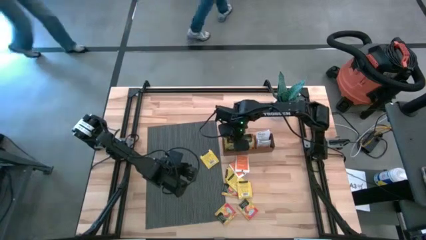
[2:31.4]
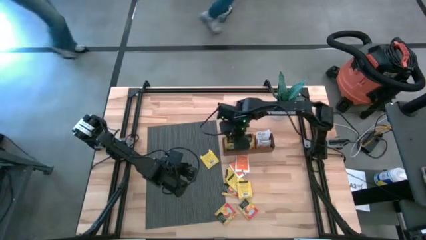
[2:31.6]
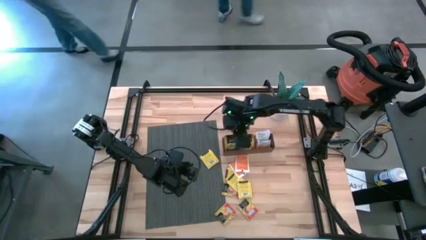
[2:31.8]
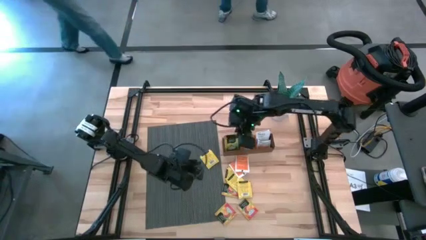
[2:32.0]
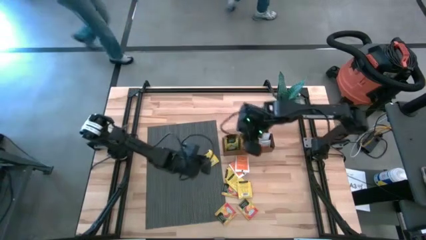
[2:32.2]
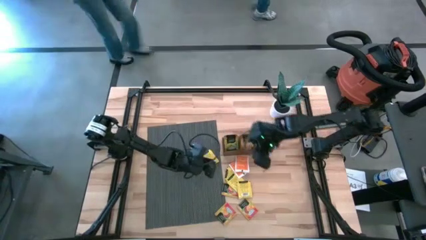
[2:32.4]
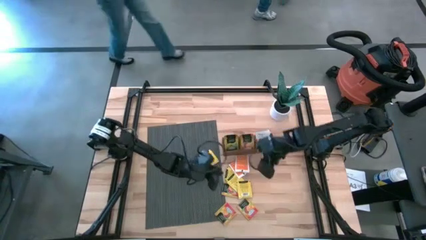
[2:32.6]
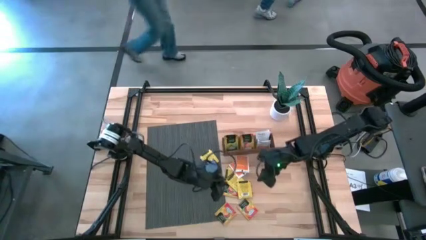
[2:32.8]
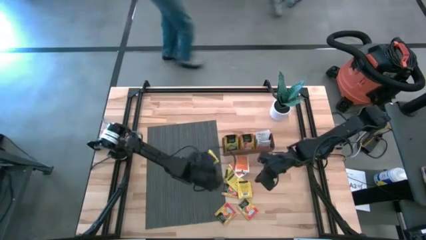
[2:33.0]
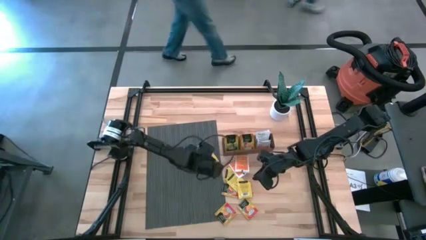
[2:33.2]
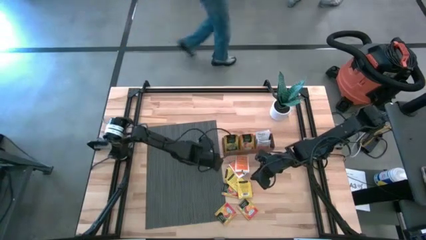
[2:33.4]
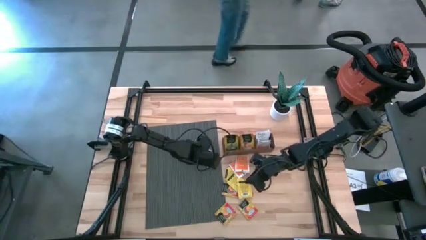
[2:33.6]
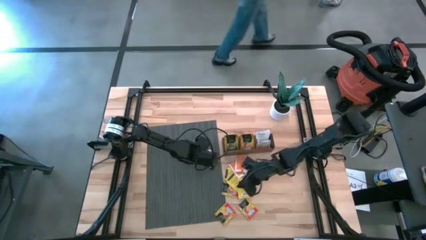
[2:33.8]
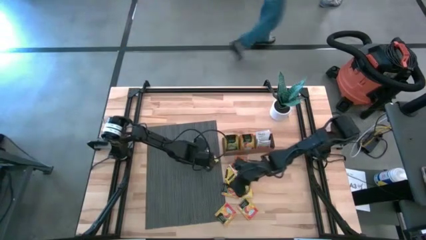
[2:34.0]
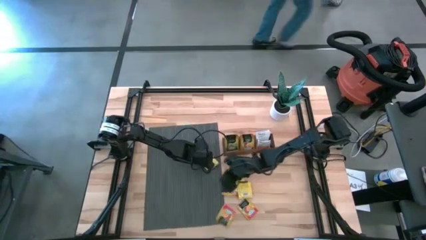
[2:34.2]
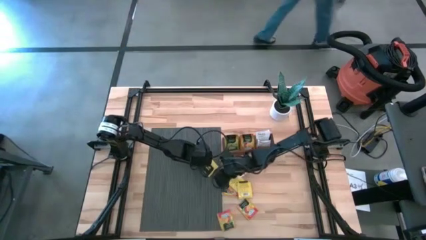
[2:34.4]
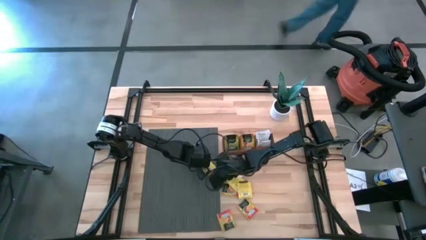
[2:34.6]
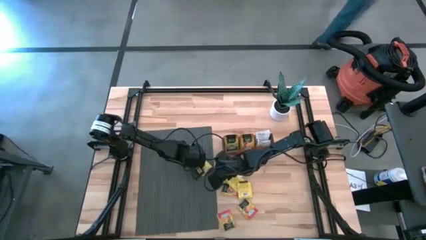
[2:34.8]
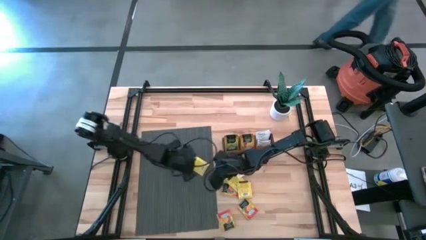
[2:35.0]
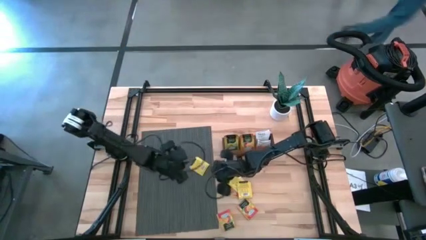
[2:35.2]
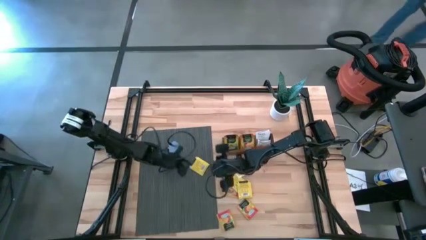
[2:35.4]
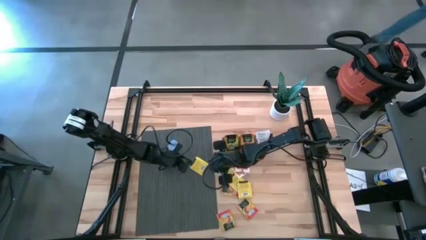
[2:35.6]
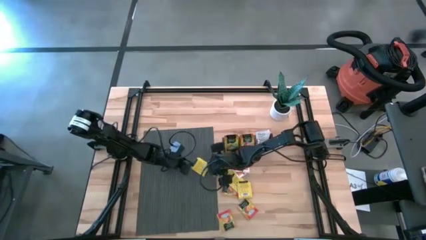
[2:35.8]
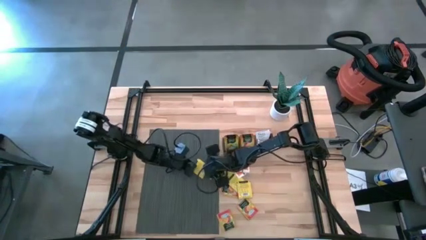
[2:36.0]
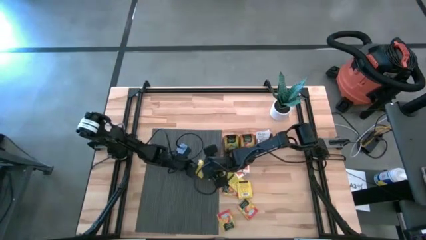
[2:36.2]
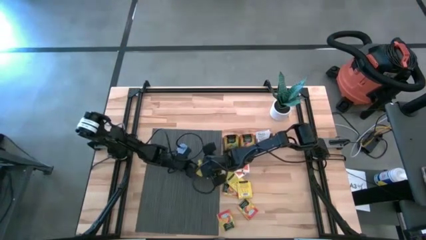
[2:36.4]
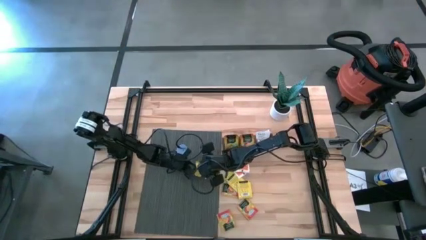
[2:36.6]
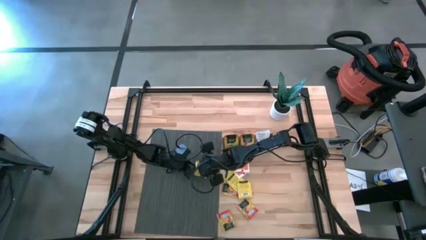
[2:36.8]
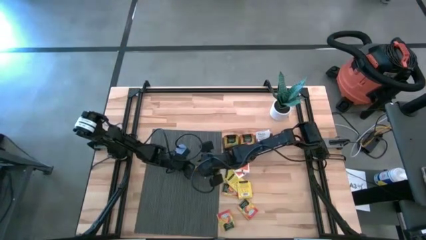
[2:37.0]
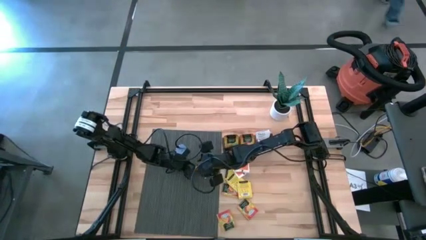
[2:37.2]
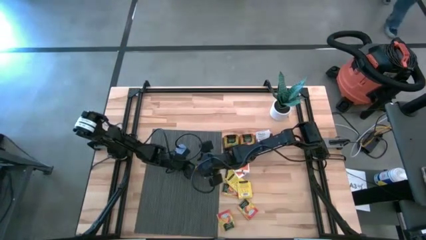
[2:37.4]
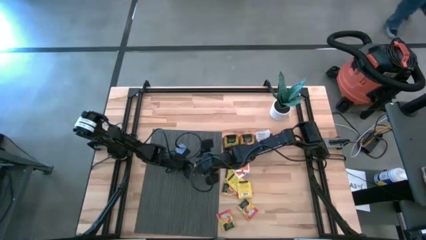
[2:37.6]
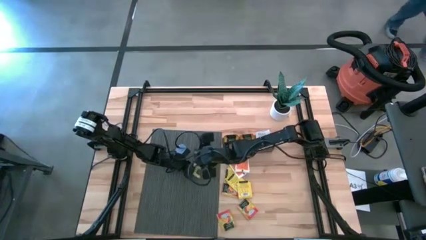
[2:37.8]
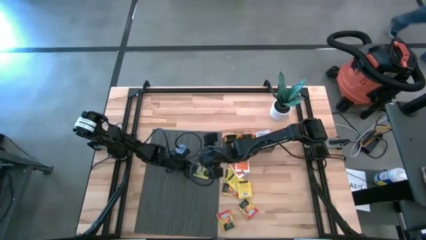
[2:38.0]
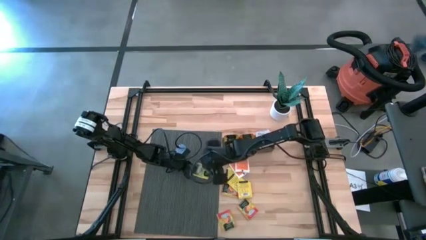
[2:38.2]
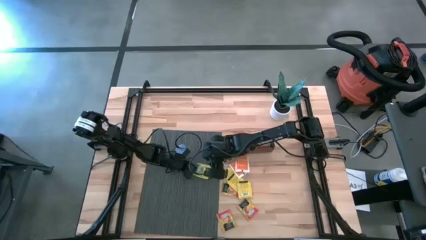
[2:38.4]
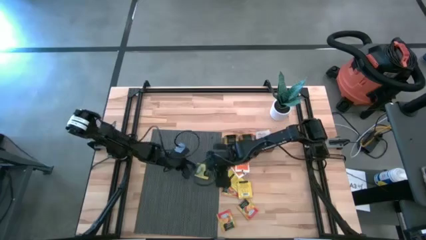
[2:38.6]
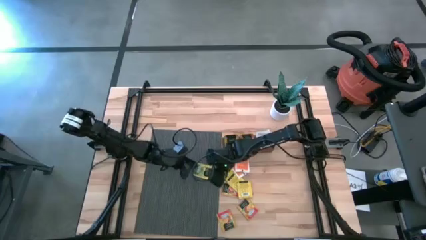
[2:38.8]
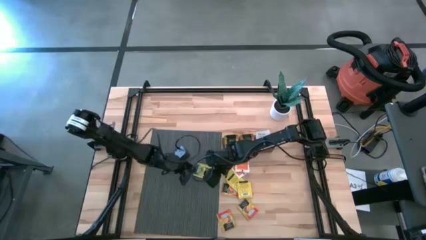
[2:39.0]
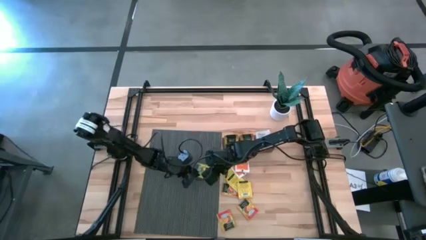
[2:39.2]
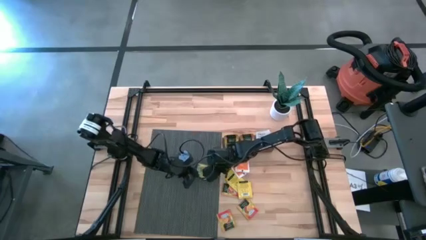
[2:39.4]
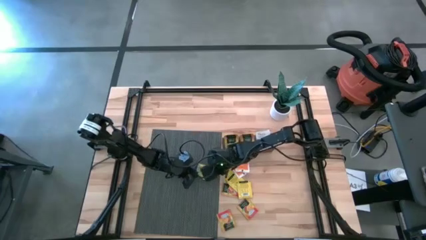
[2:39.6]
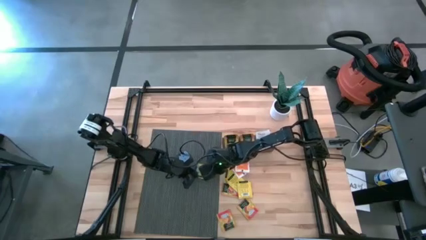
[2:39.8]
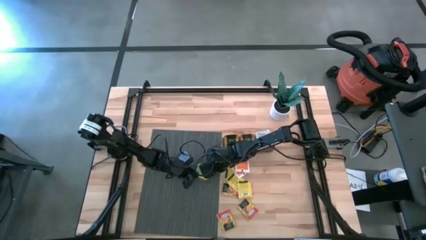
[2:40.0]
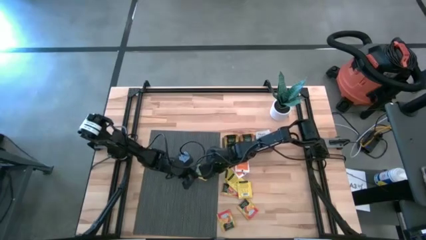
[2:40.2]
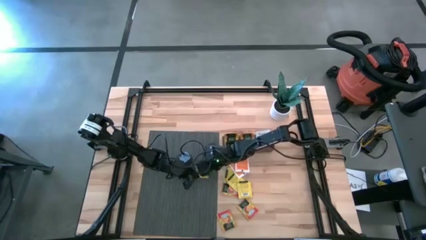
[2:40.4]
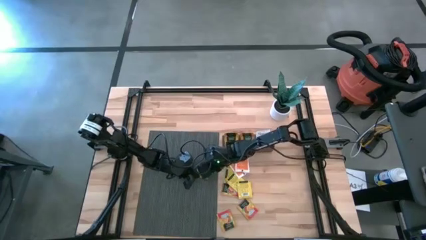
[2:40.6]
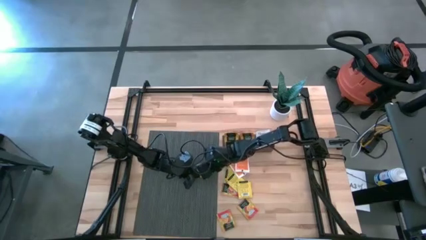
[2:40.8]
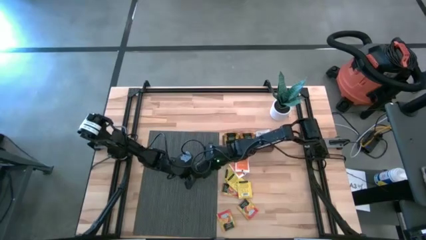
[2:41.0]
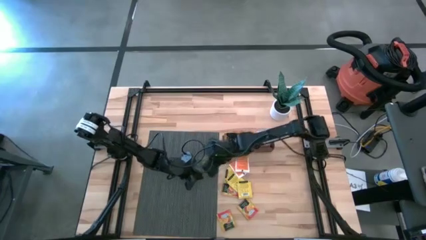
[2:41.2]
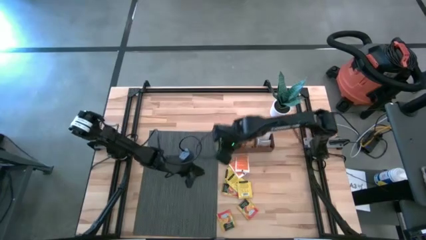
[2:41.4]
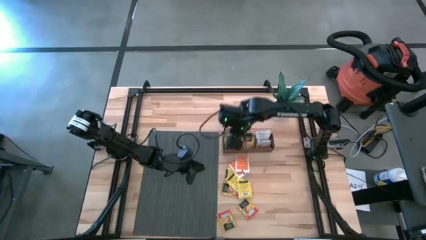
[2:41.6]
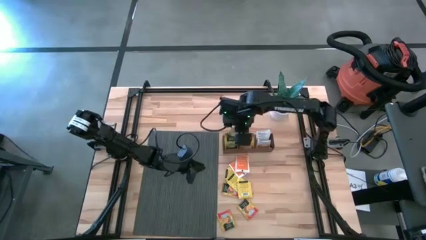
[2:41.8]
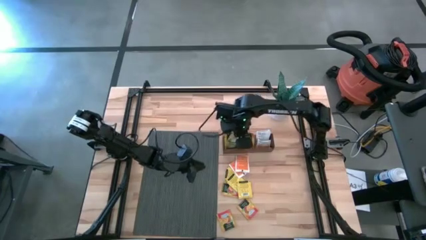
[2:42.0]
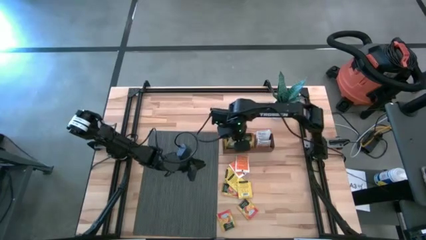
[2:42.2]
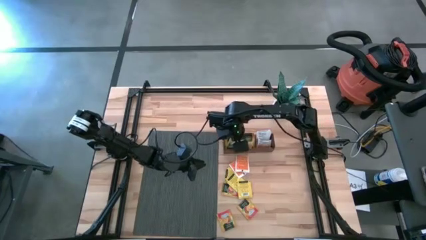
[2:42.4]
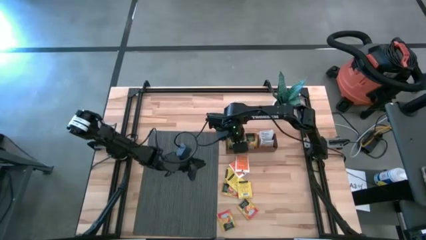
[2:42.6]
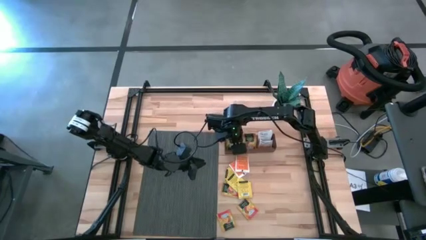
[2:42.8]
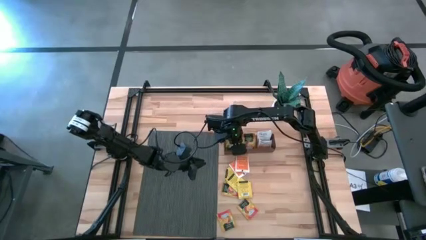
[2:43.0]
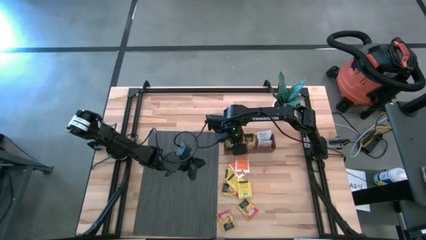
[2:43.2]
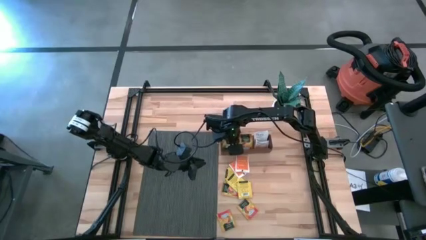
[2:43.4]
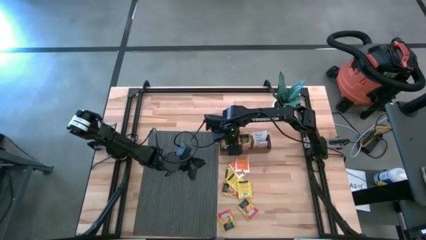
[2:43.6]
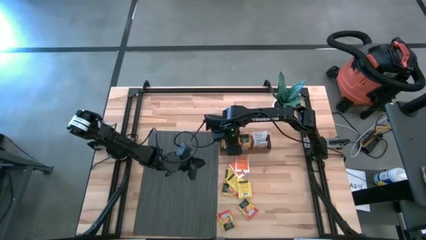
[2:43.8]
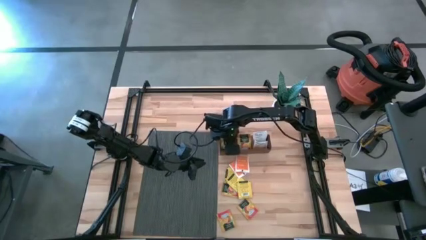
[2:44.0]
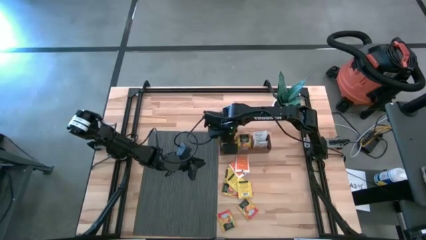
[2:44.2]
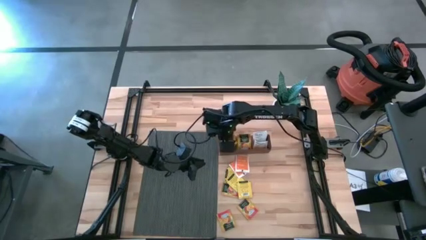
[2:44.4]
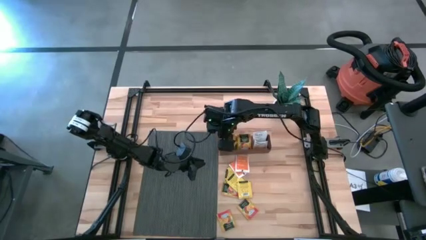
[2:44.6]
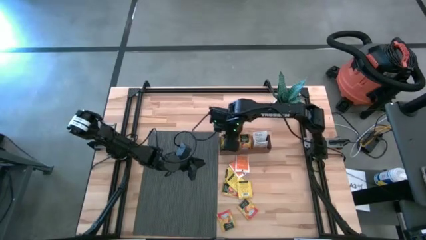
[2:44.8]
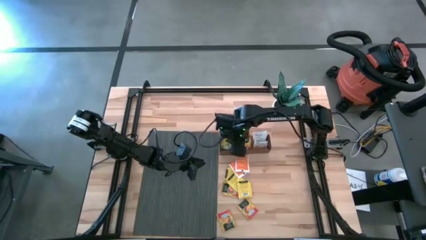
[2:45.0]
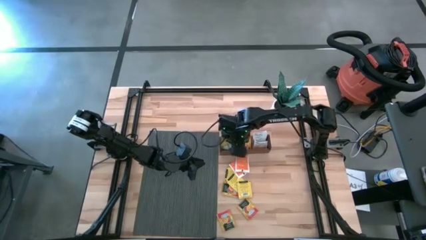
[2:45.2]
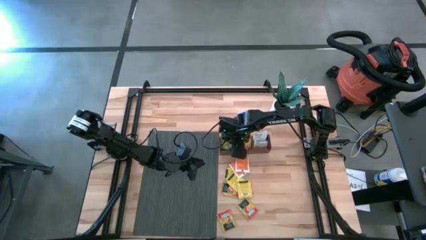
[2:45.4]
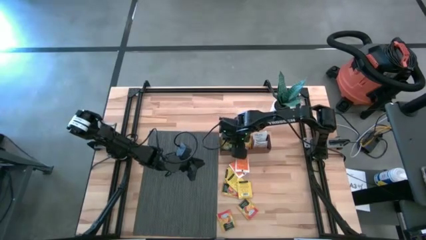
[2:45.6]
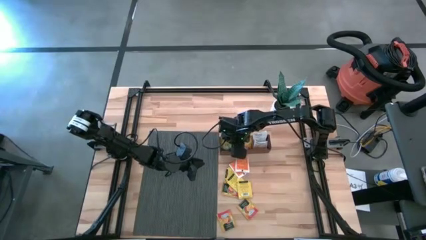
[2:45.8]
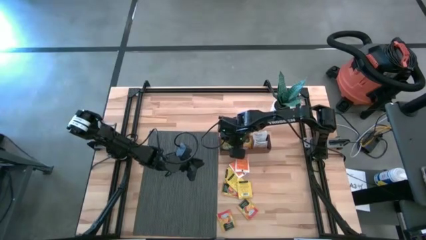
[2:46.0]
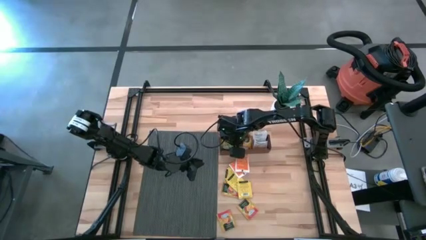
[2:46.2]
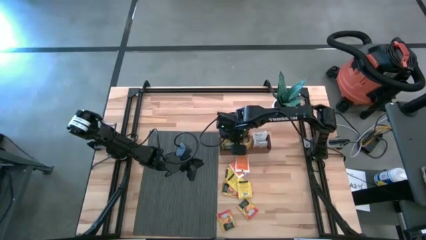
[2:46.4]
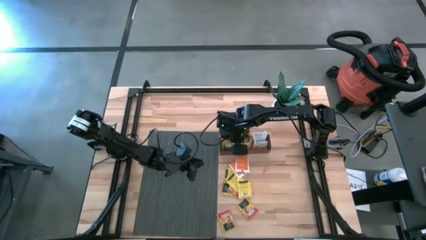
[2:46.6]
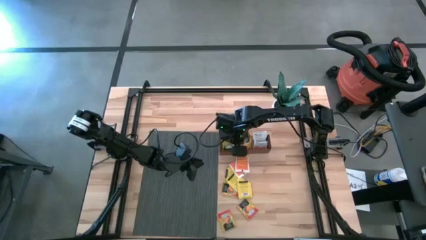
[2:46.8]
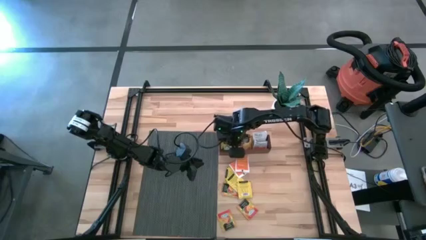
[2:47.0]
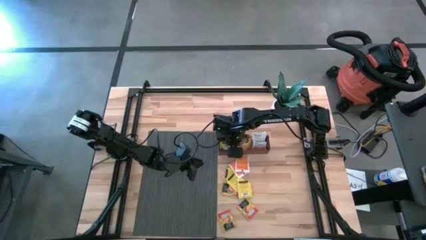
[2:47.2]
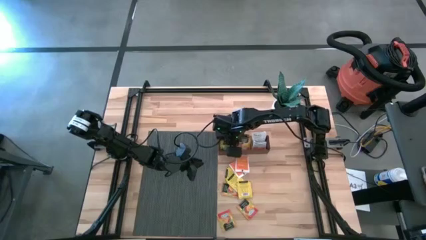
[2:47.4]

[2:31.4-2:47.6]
Task: Pick & Place Tea
Put the yellow tea bag into the middle section of the wooden organizer
